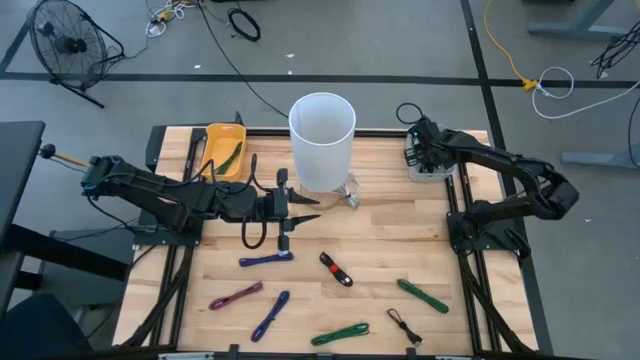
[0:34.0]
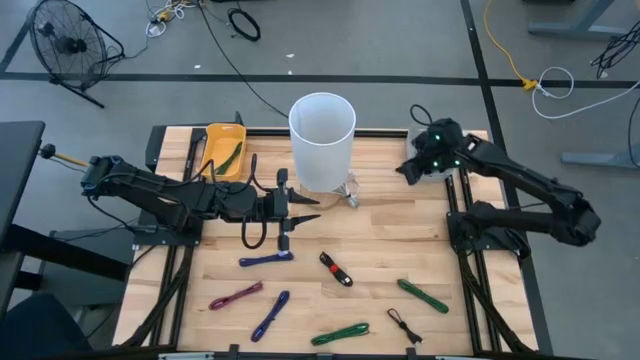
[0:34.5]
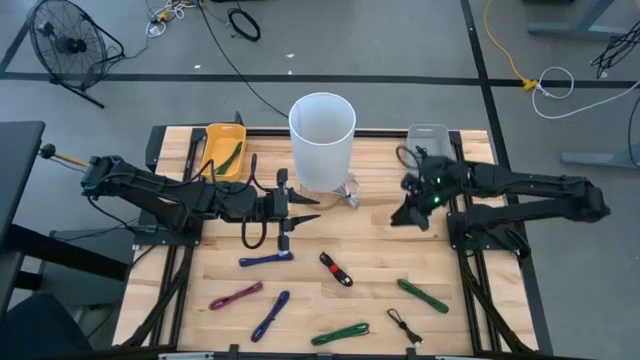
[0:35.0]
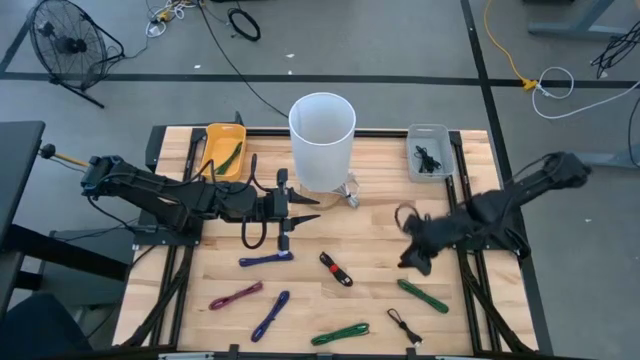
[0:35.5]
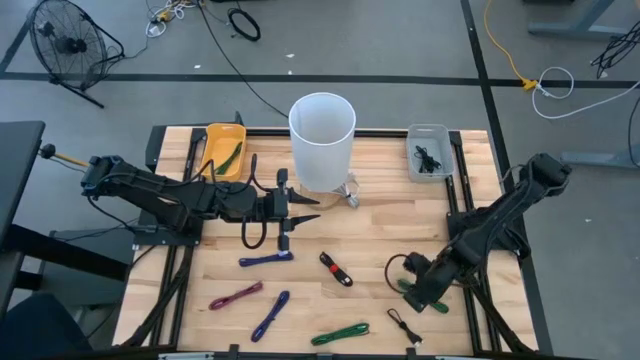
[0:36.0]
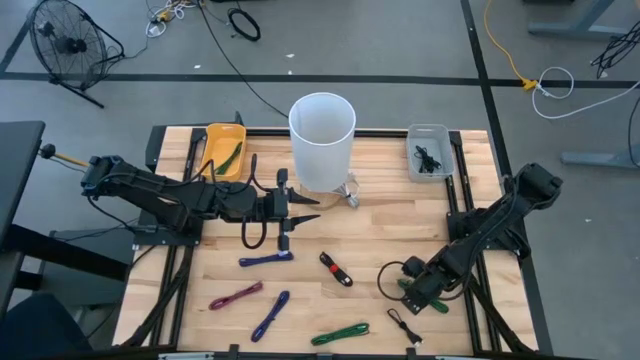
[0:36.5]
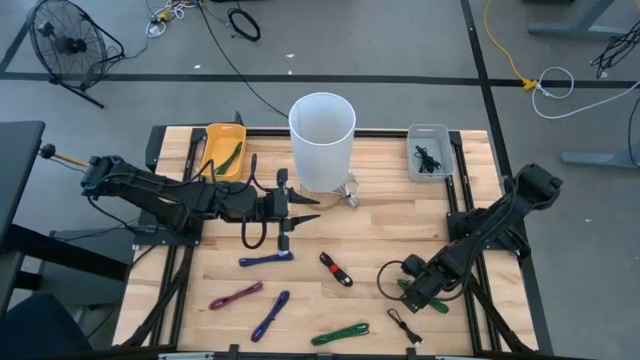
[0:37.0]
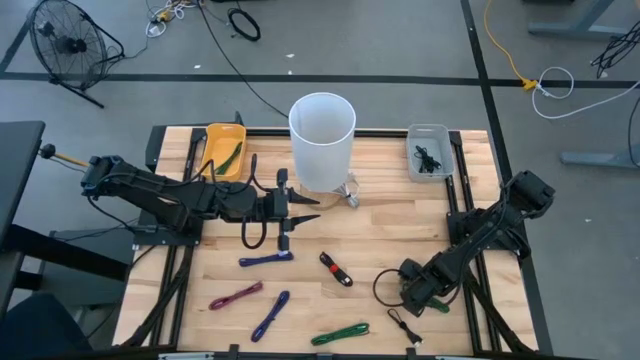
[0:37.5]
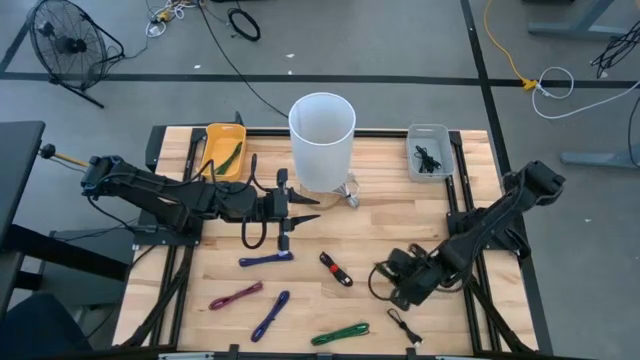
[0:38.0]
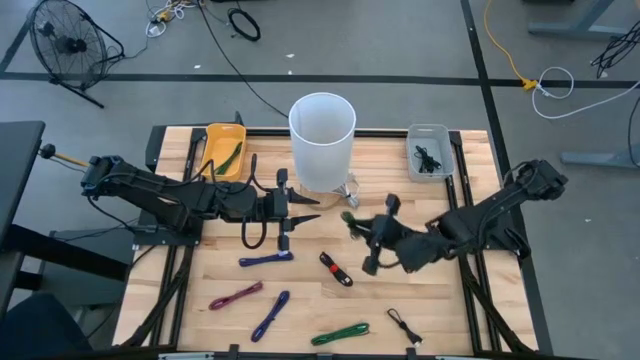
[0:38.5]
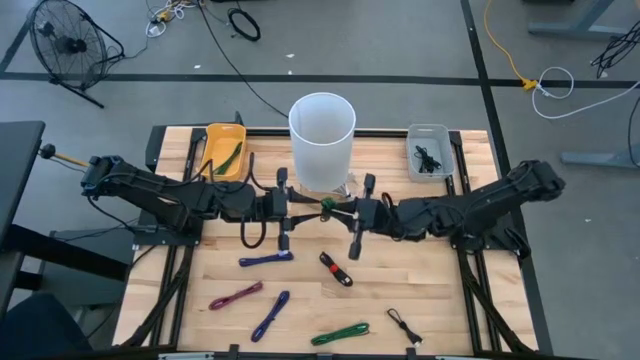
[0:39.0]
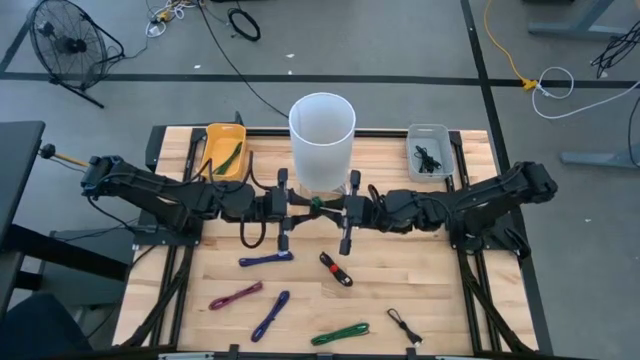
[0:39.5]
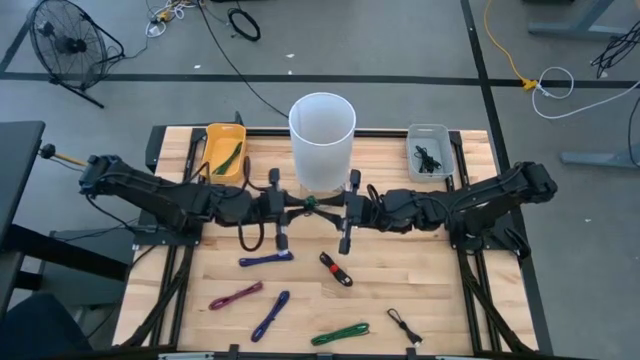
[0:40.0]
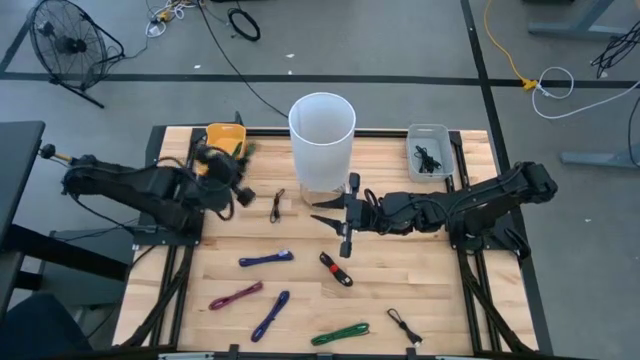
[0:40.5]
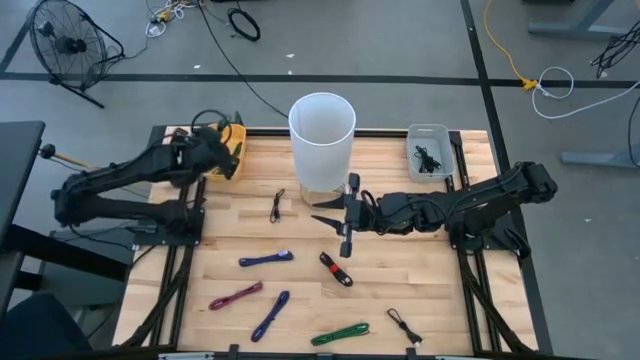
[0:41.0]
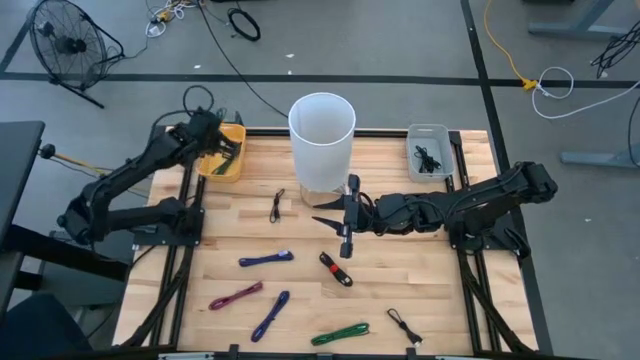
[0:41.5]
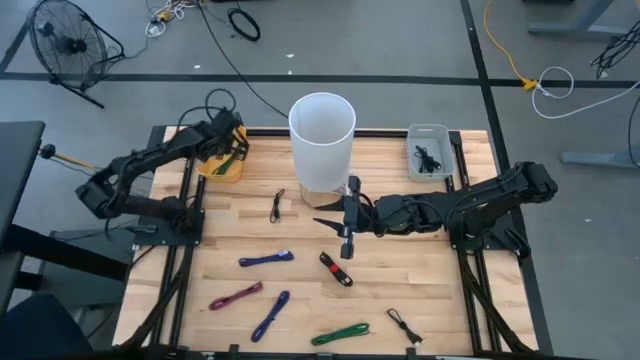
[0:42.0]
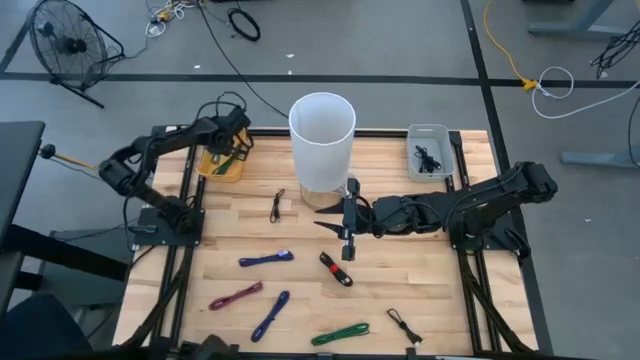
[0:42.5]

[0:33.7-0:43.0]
Task: Pick & Place USB Port
Put the green USB cable into the yellow bin

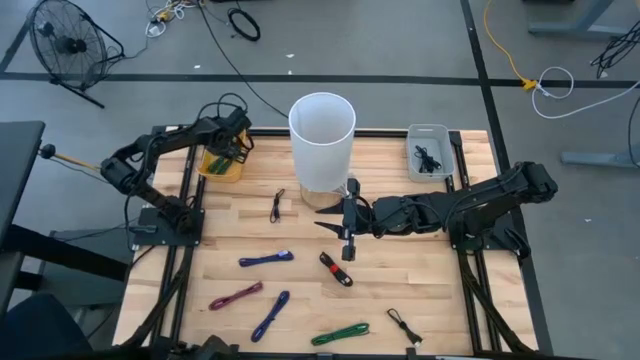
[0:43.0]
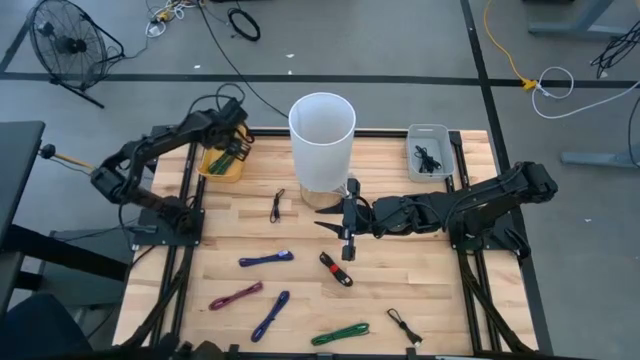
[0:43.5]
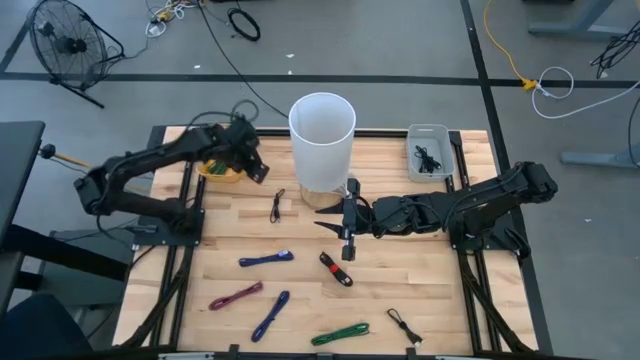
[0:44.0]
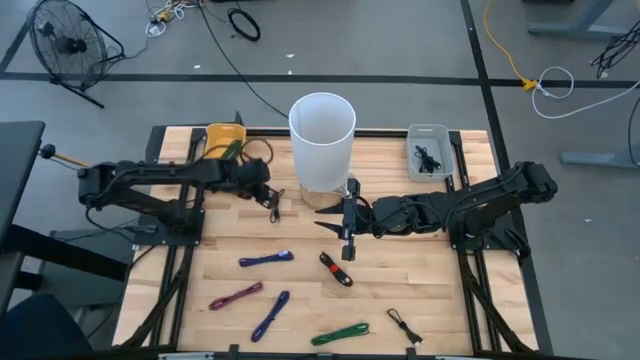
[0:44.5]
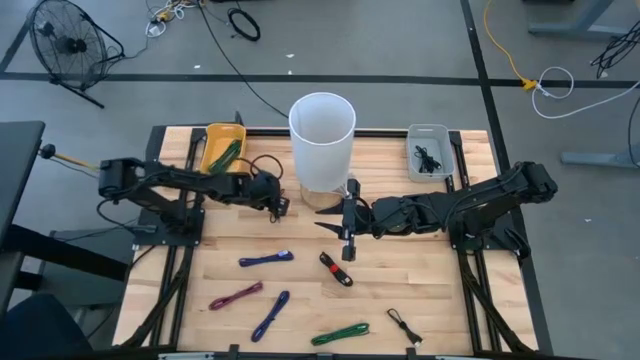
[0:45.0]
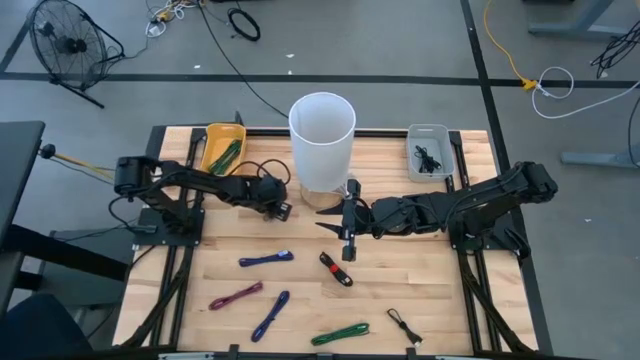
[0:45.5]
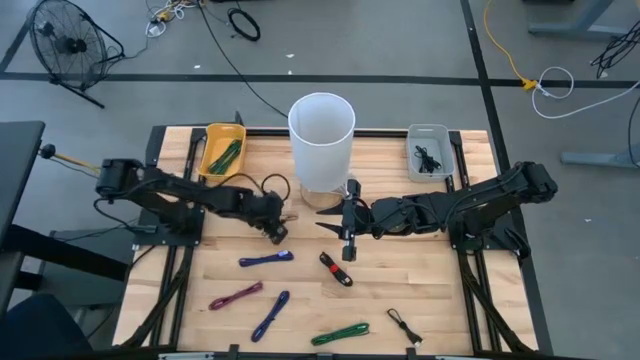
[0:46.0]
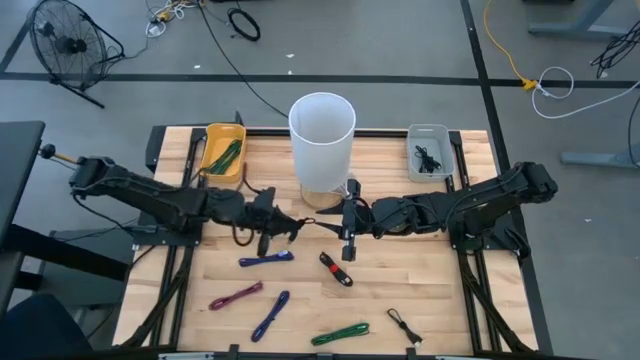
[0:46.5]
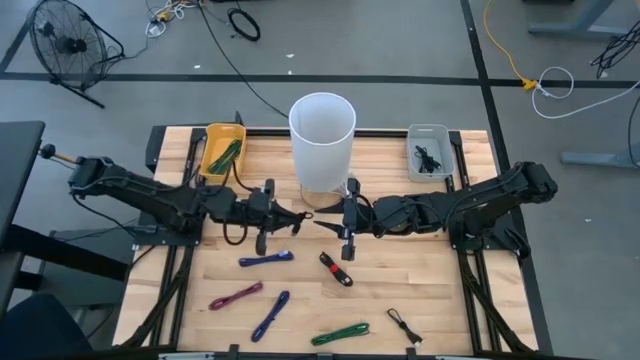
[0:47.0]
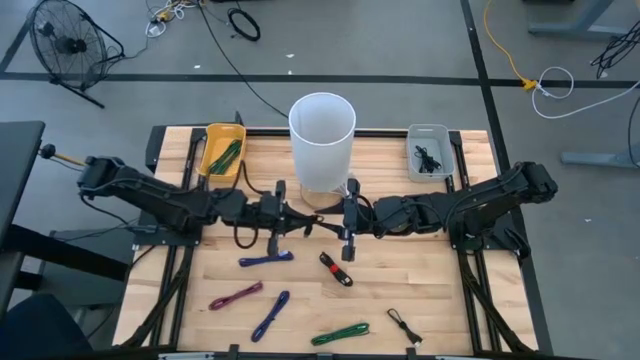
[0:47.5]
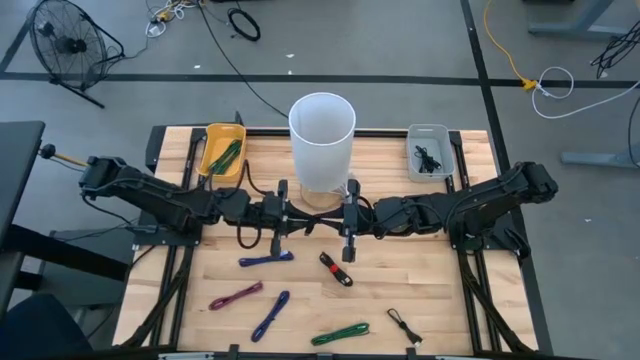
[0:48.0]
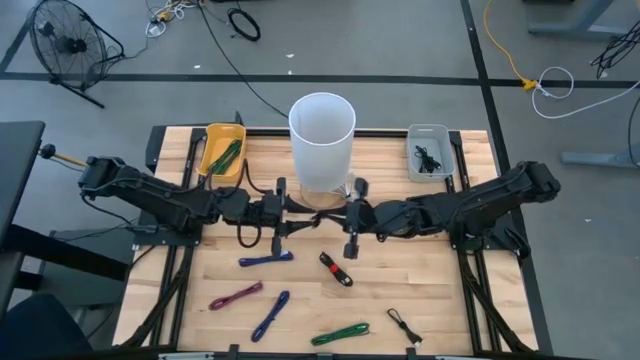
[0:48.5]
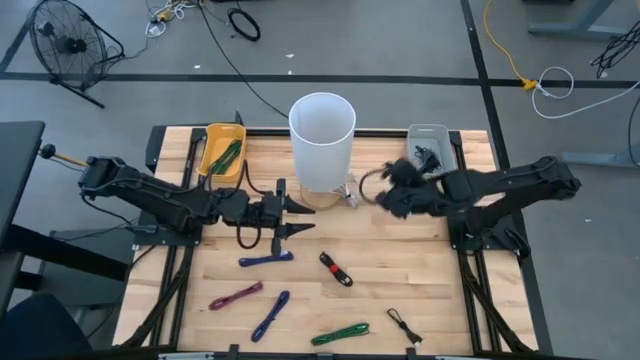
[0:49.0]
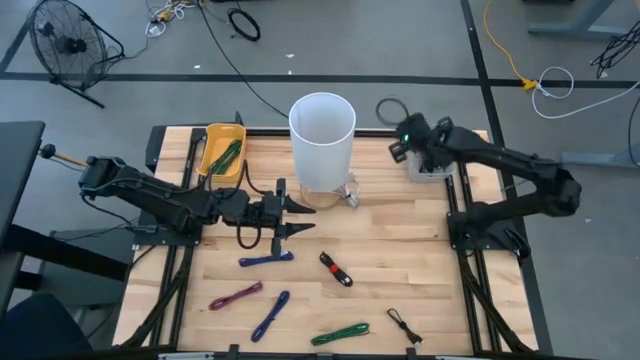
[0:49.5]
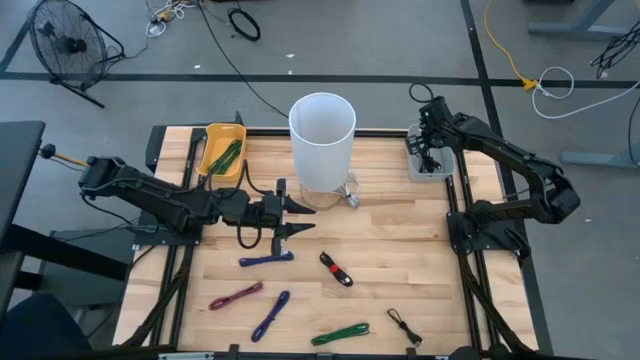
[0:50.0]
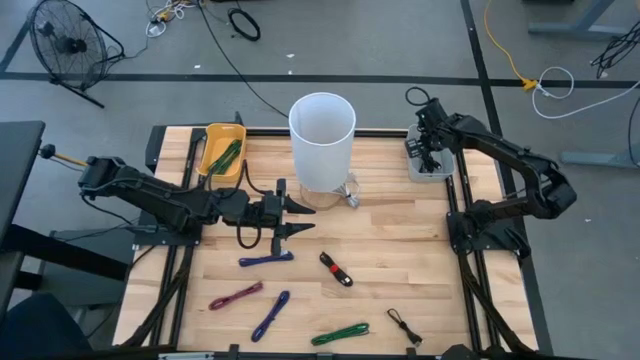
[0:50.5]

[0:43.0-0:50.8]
Put the black USB cable into the gray bin

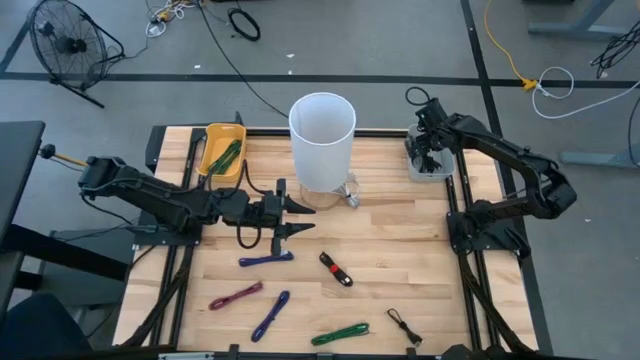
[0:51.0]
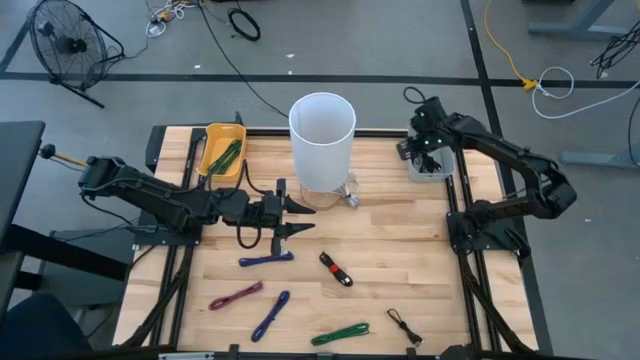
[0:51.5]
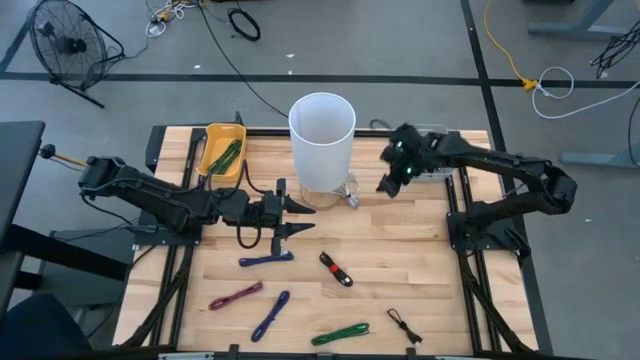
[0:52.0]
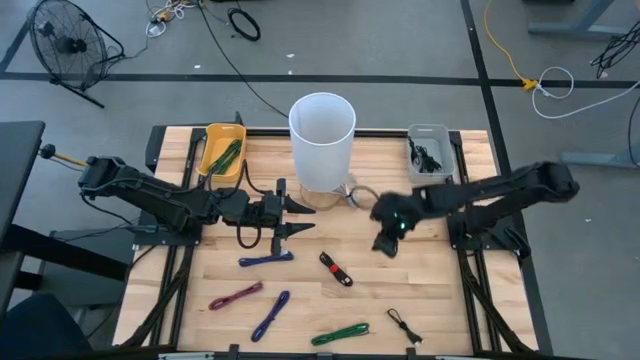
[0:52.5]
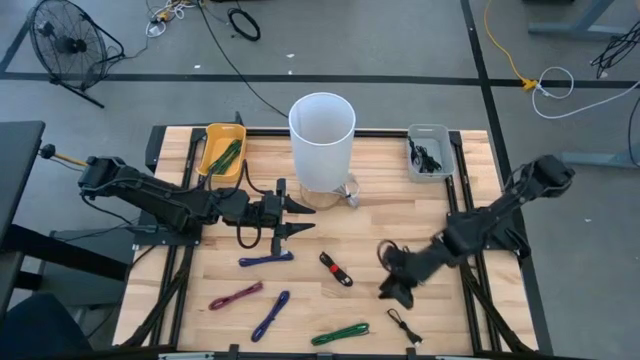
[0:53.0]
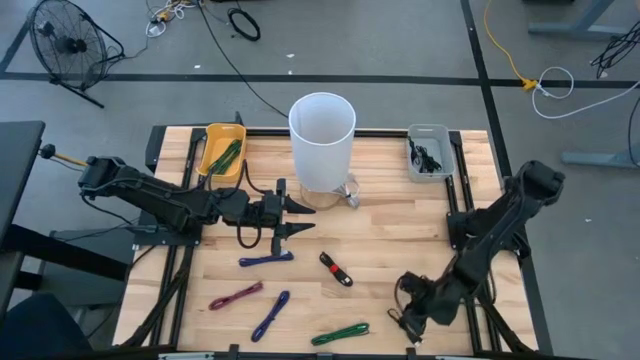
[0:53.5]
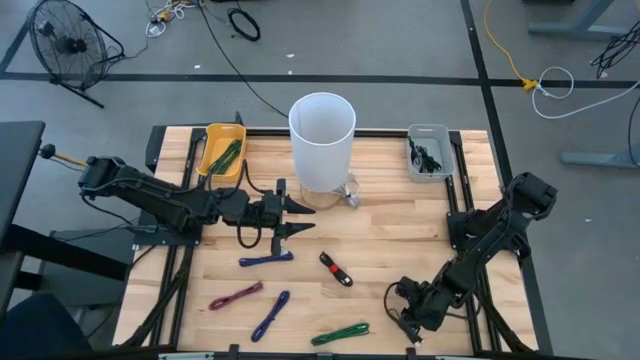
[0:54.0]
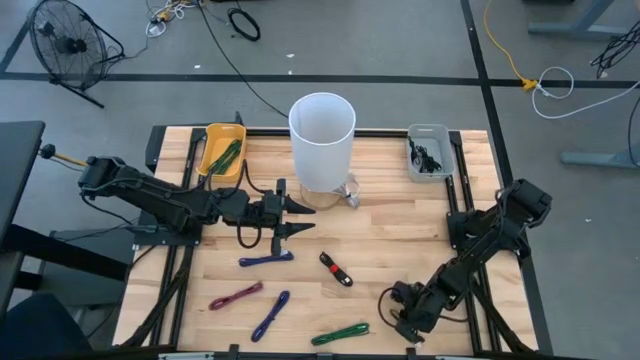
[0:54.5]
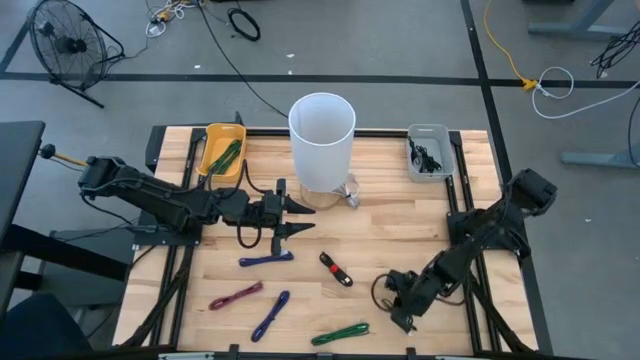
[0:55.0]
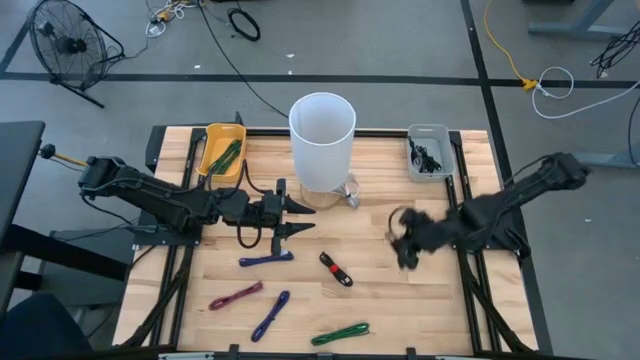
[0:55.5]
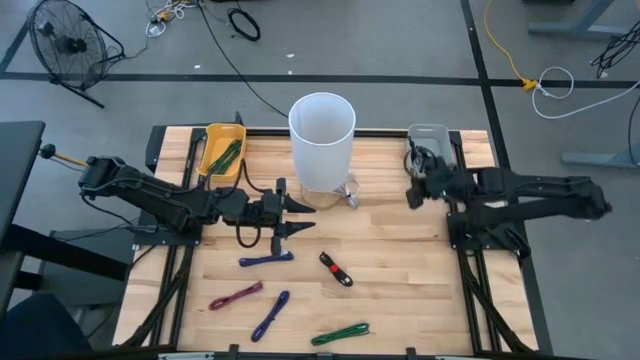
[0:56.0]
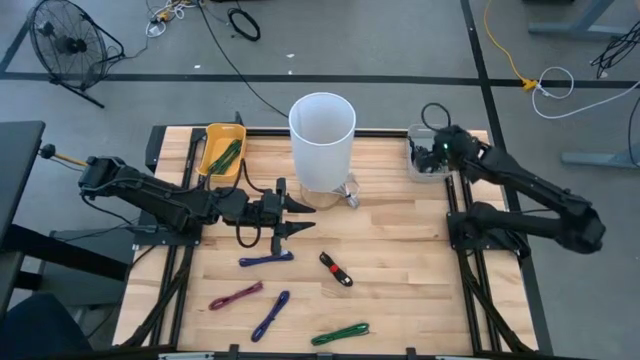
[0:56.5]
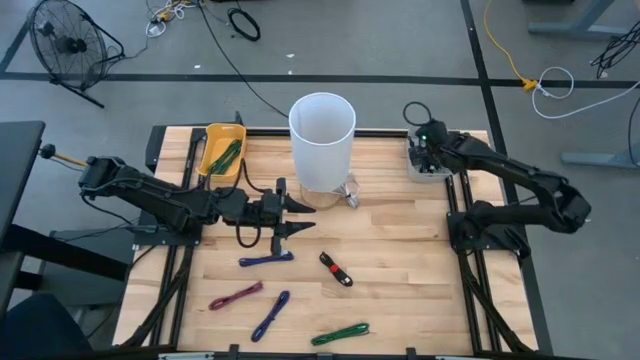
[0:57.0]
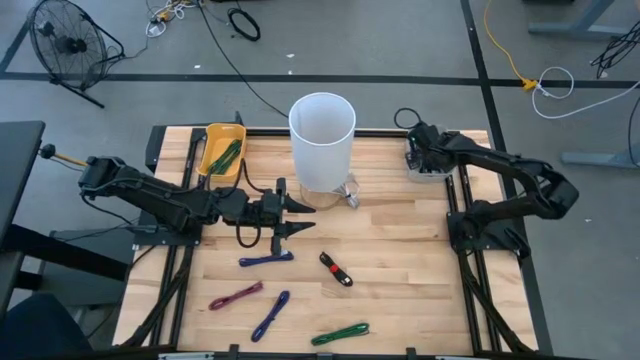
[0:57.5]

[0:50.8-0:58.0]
Put the black USB cable into the gray bin
